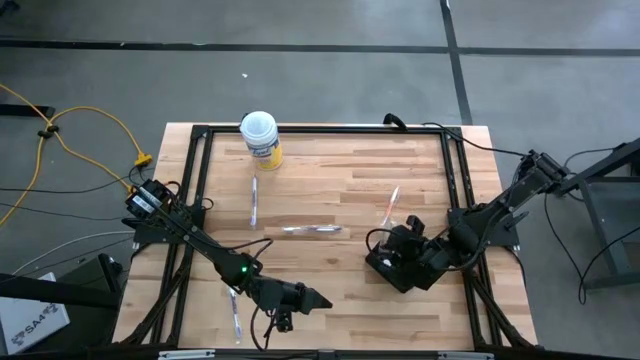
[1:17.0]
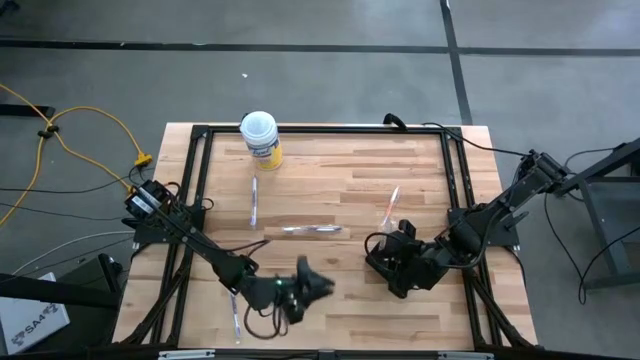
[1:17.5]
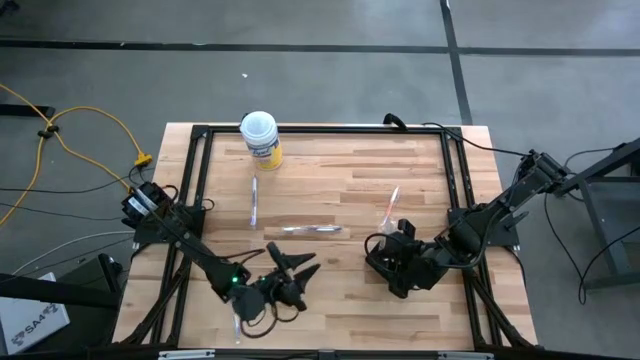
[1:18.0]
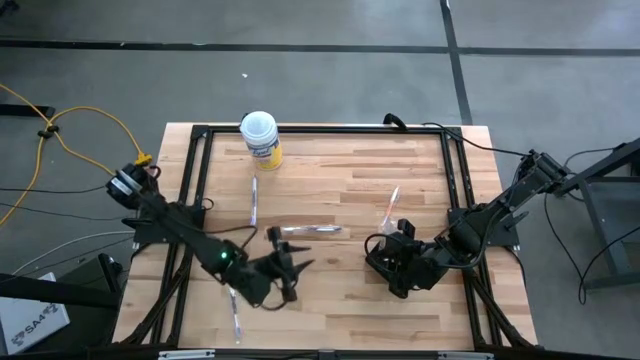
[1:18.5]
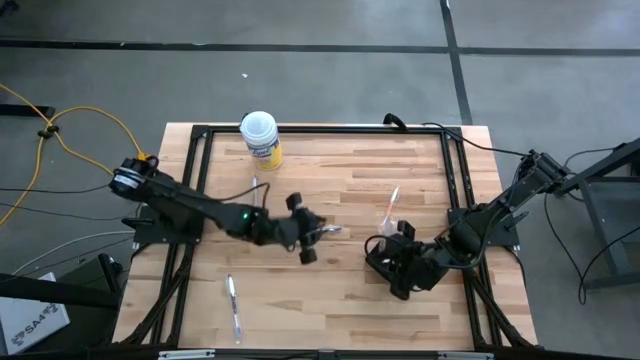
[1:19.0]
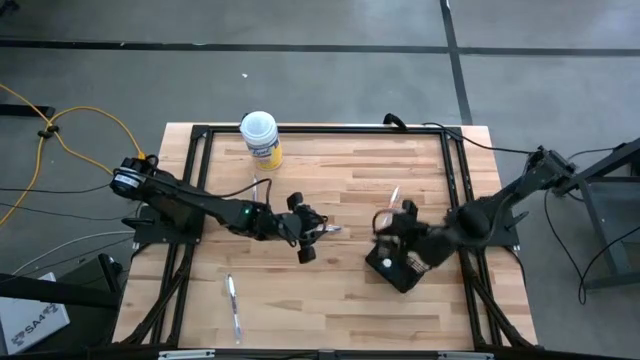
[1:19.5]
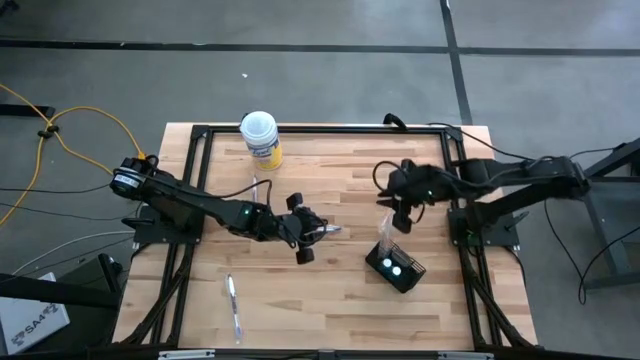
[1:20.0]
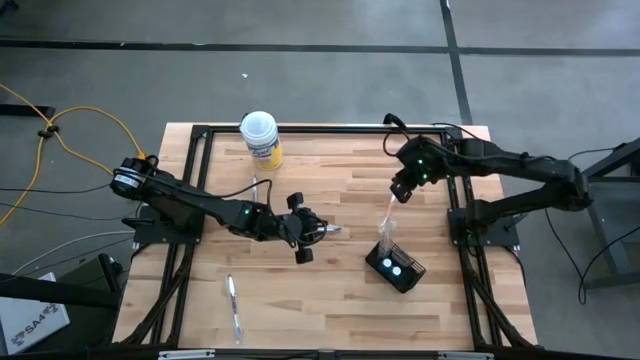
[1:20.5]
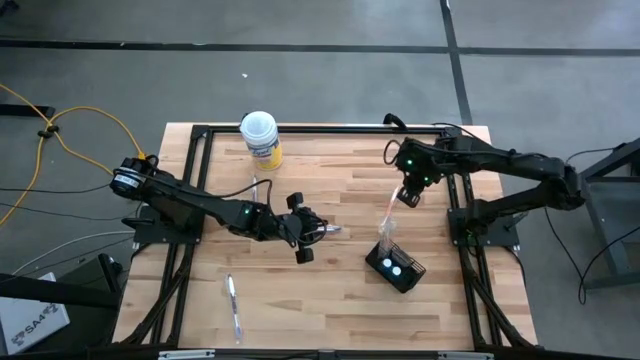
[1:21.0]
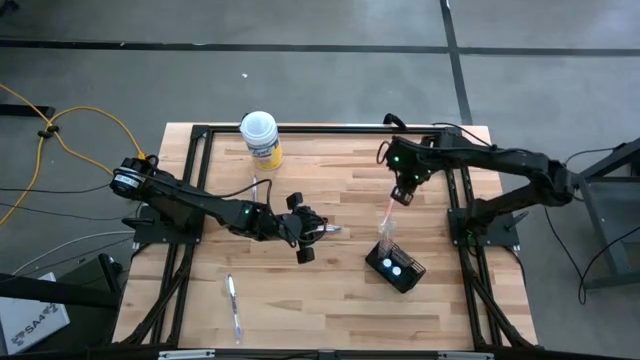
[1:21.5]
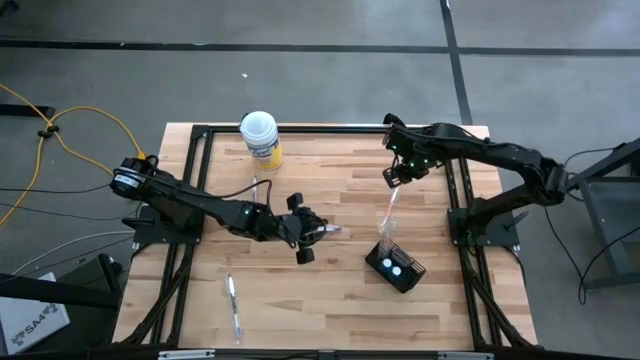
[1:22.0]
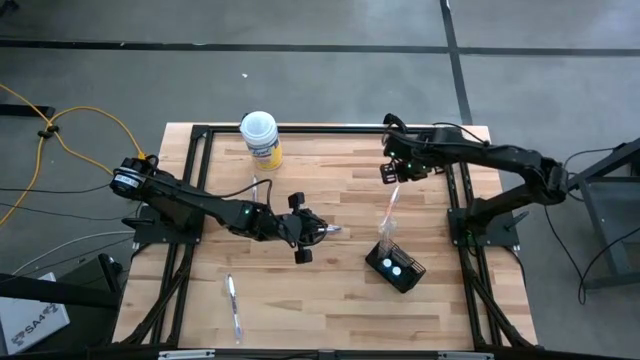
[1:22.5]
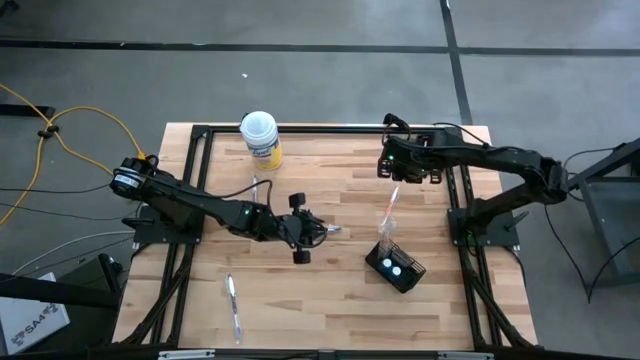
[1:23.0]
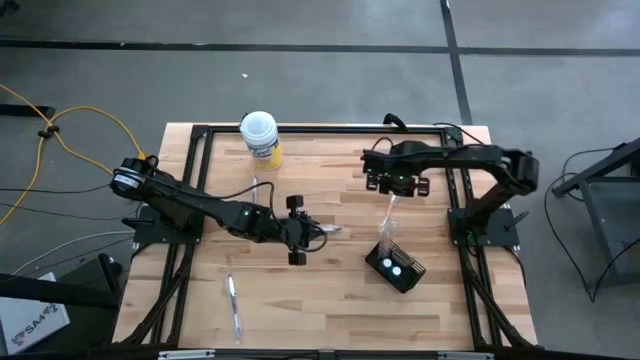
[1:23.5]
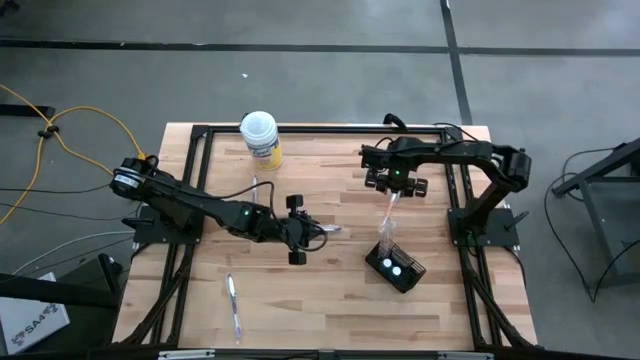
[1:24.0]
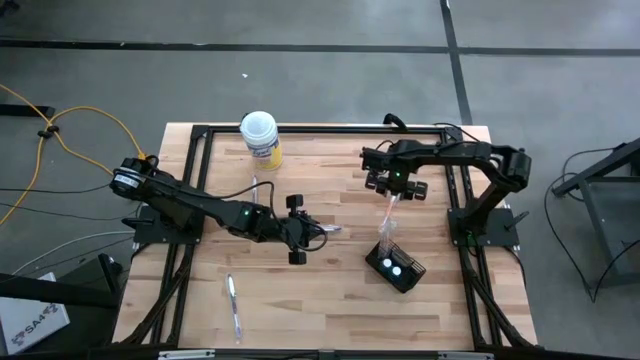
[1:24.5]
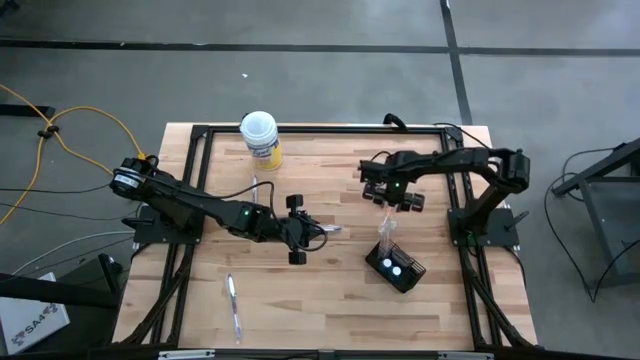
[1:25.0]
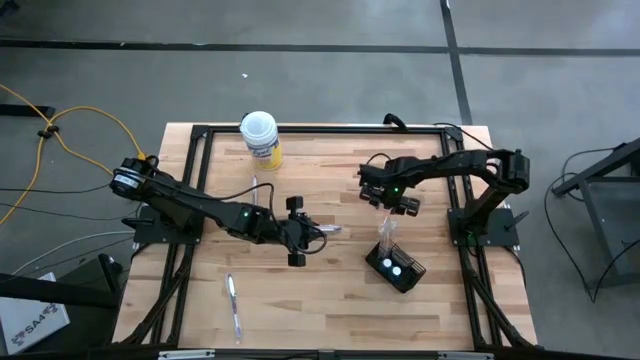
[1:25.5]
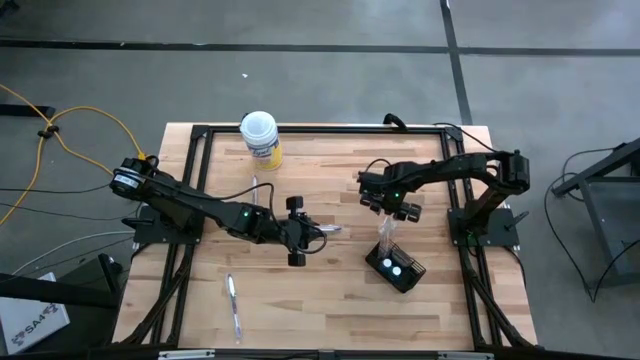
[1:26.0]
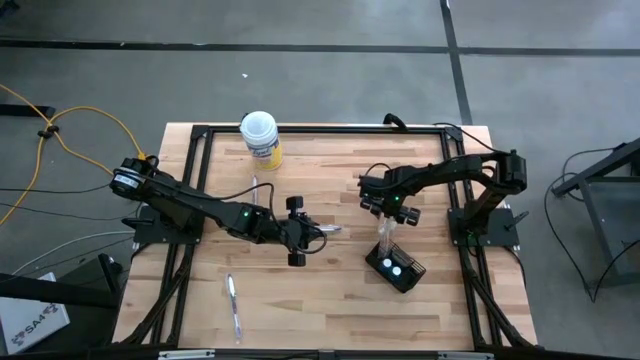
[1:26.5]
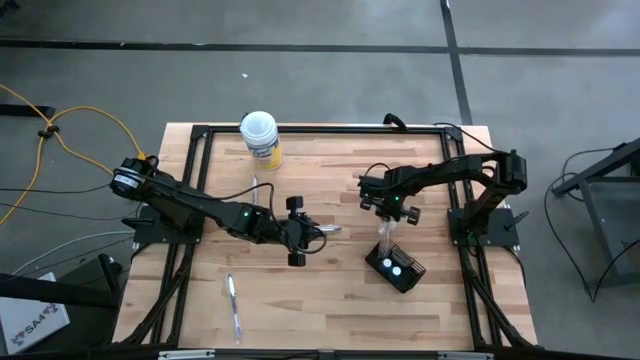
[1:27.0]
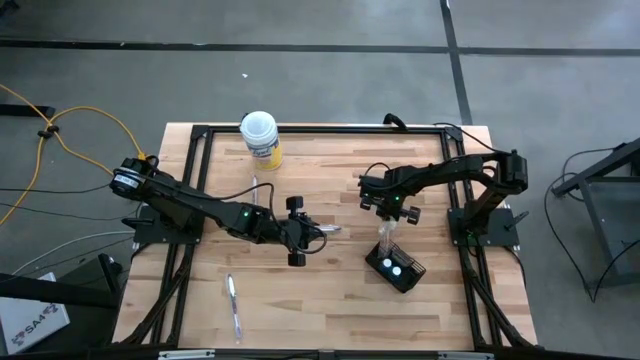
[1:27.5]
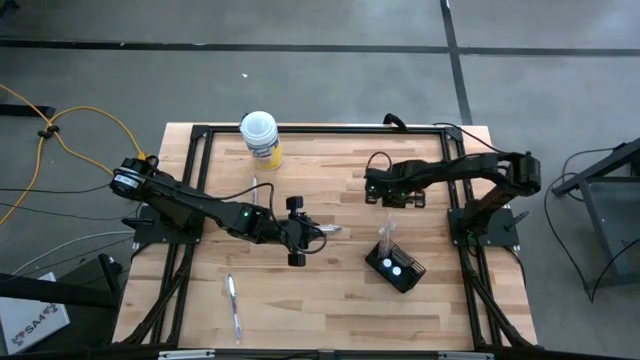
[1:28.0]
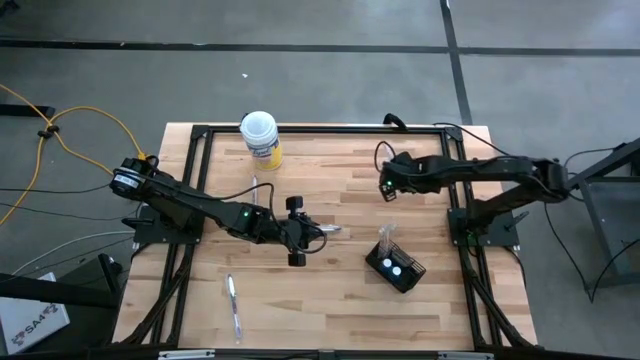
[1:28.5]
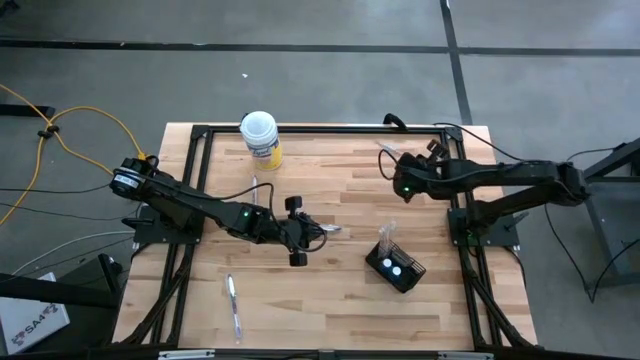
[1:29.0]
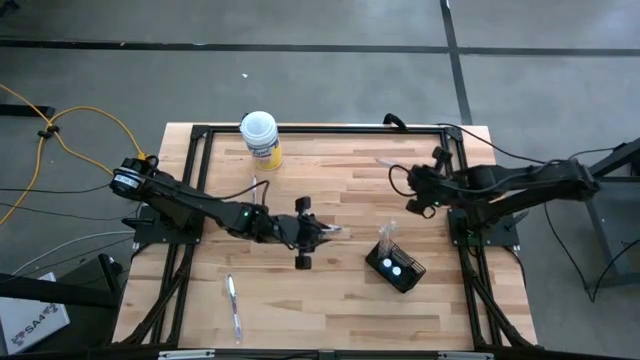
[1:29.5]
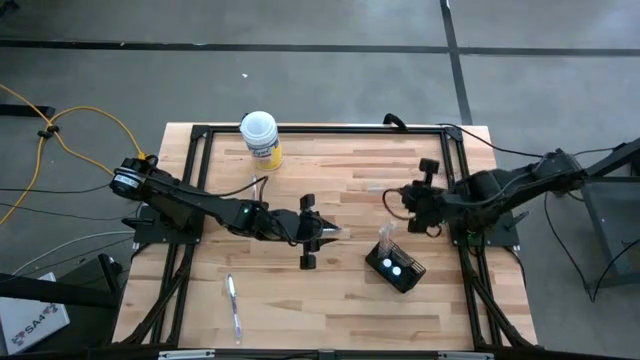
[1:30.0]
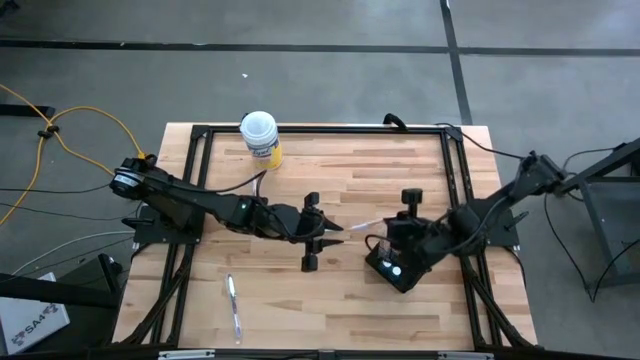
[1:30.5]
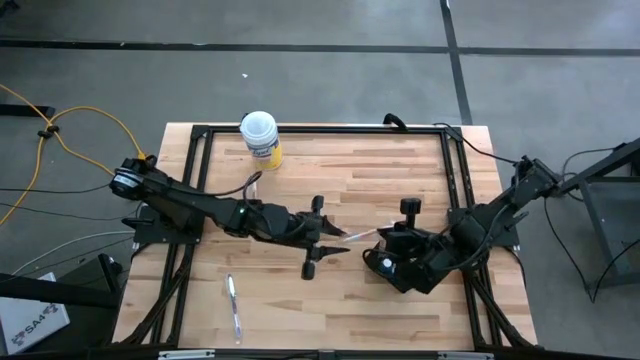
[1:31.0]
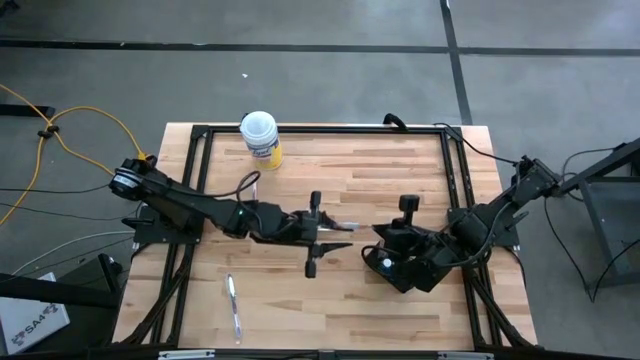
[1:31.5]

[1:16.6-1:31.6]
Task: Pick & Place toothbrushing station
Put the orange toothbrush into the wire organizer
